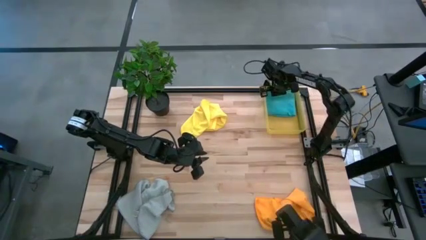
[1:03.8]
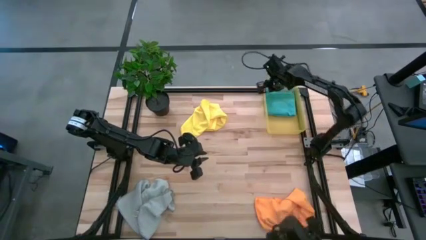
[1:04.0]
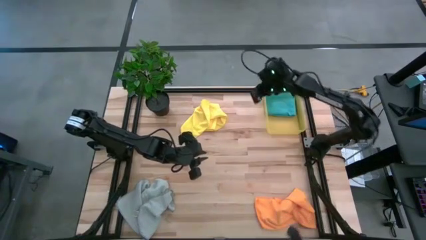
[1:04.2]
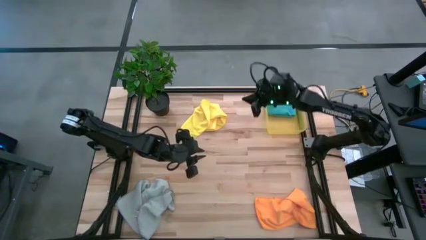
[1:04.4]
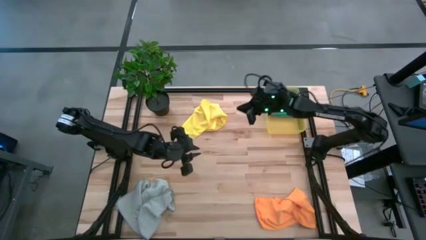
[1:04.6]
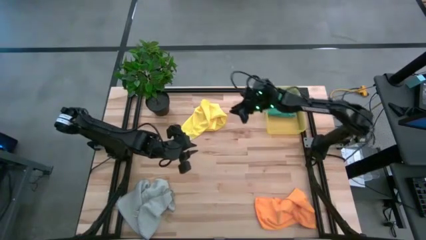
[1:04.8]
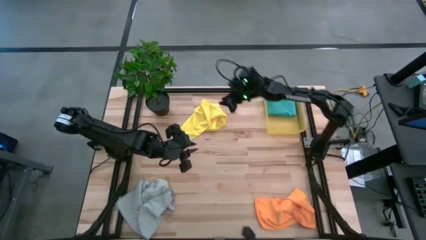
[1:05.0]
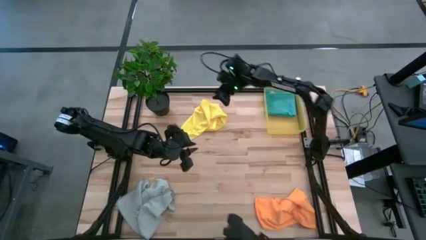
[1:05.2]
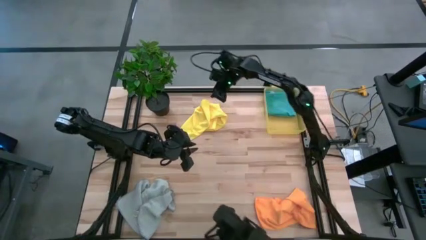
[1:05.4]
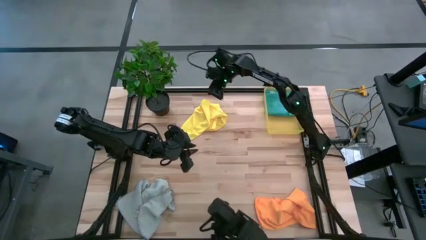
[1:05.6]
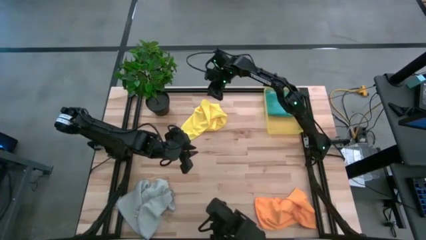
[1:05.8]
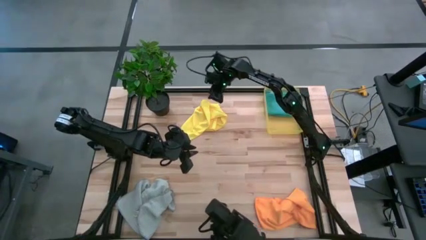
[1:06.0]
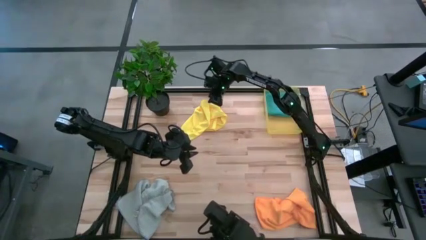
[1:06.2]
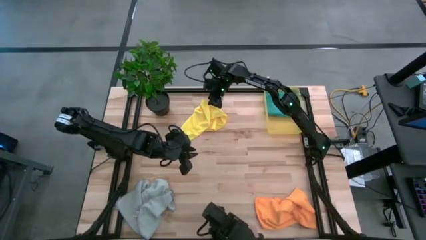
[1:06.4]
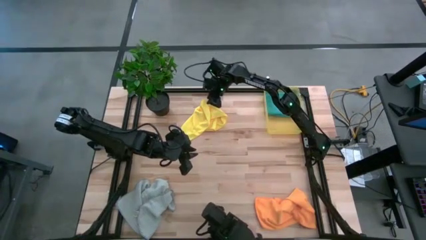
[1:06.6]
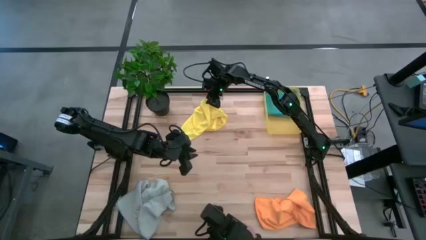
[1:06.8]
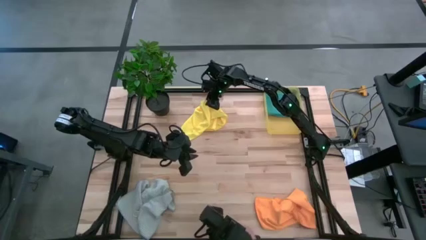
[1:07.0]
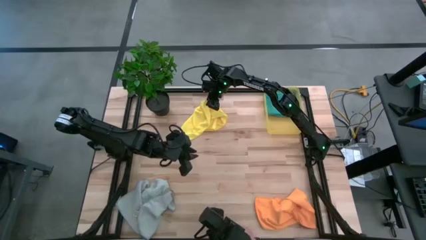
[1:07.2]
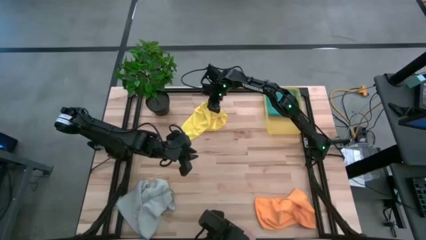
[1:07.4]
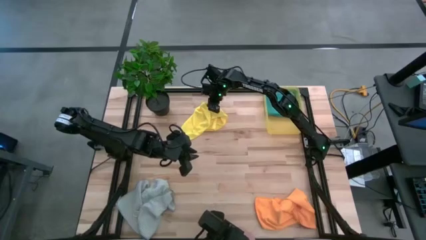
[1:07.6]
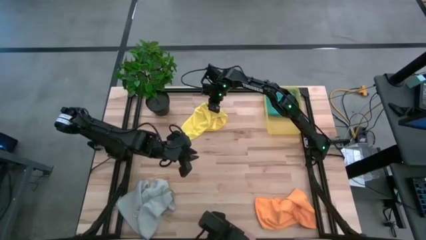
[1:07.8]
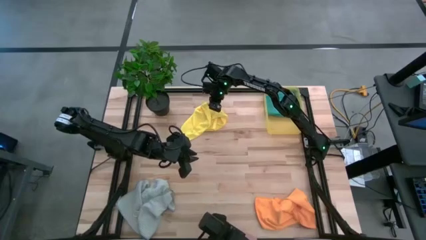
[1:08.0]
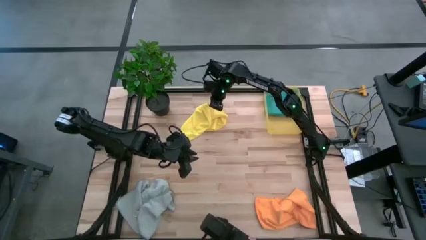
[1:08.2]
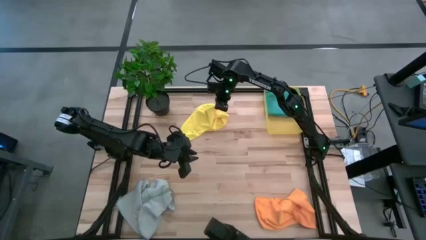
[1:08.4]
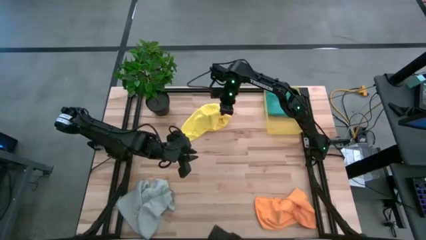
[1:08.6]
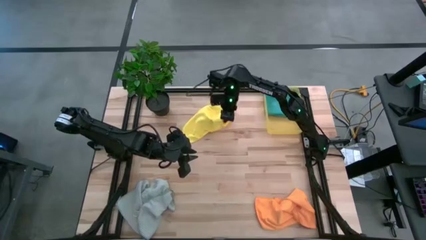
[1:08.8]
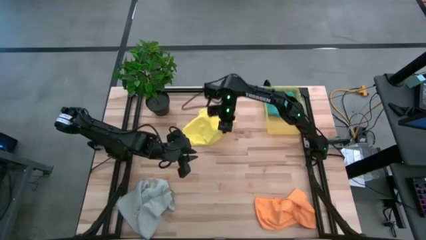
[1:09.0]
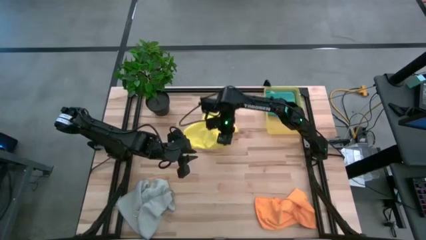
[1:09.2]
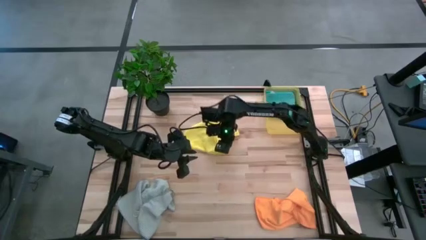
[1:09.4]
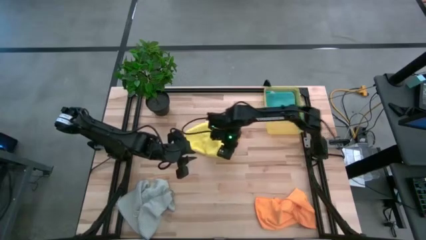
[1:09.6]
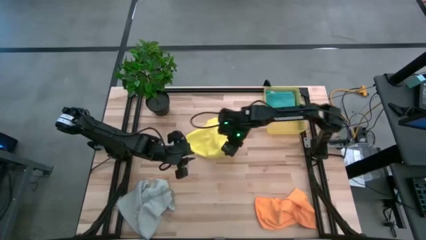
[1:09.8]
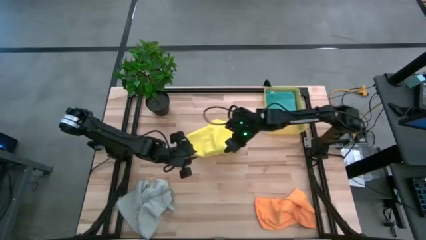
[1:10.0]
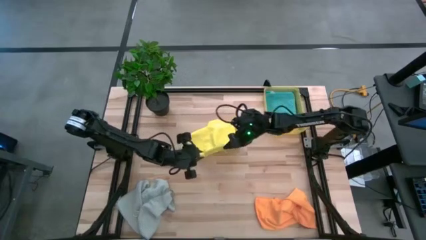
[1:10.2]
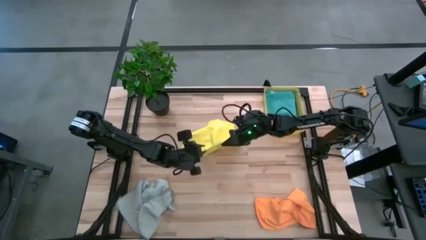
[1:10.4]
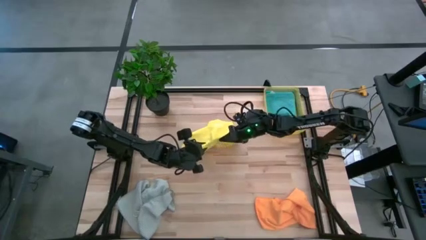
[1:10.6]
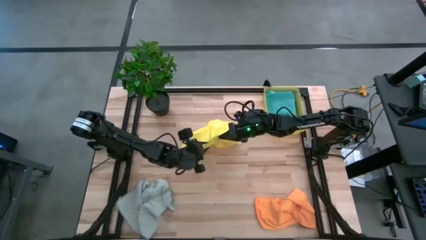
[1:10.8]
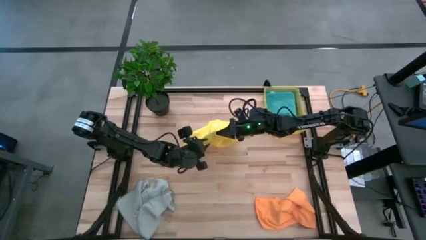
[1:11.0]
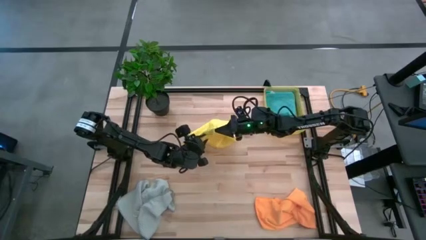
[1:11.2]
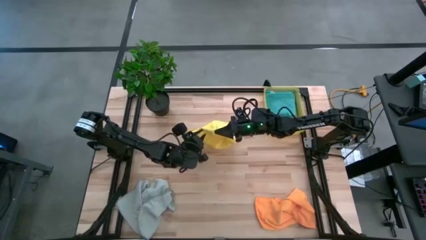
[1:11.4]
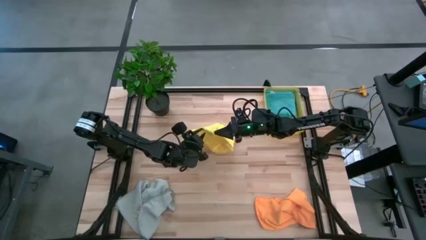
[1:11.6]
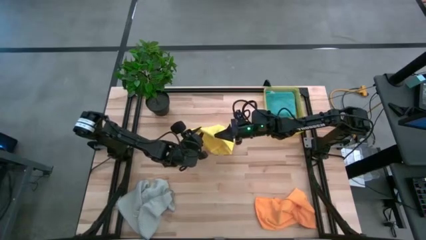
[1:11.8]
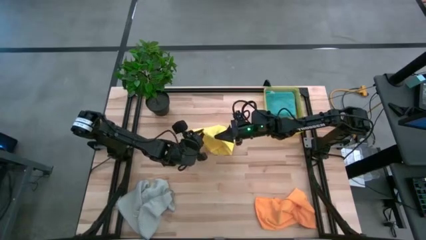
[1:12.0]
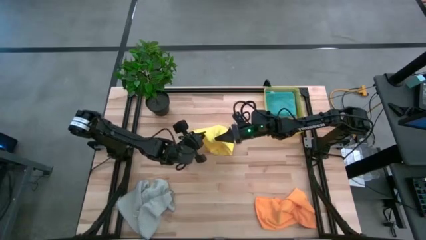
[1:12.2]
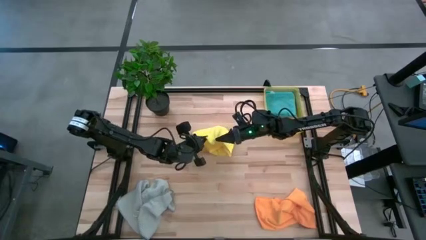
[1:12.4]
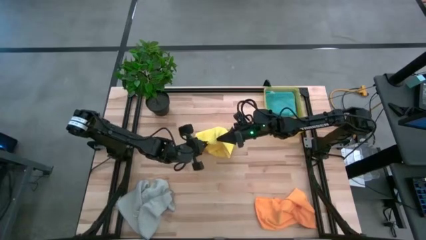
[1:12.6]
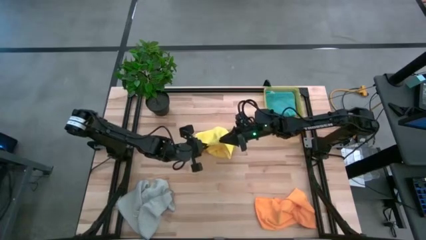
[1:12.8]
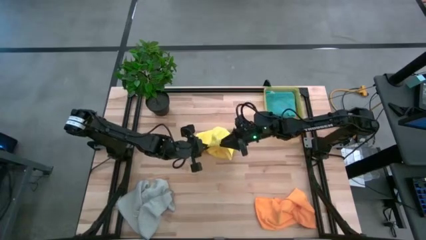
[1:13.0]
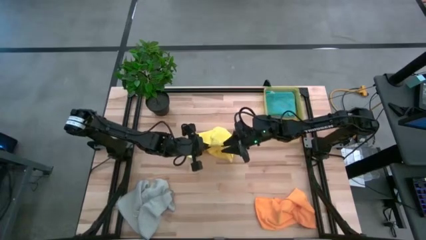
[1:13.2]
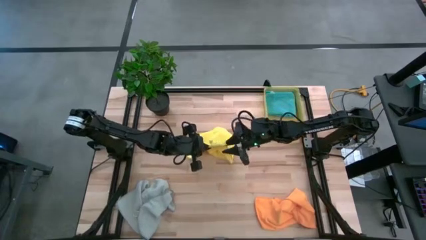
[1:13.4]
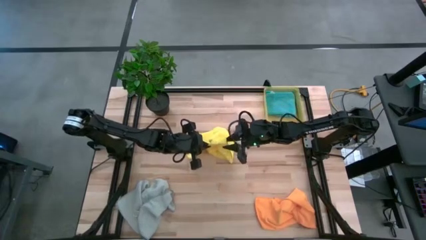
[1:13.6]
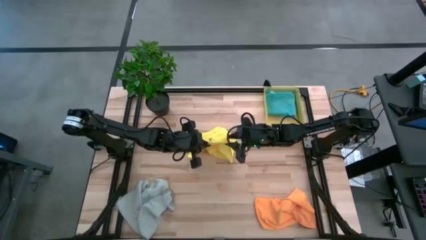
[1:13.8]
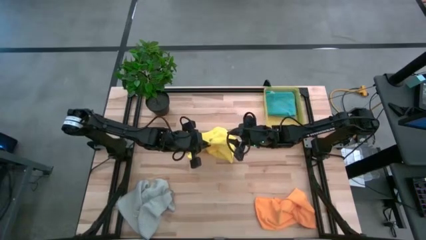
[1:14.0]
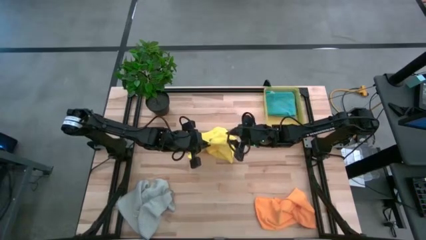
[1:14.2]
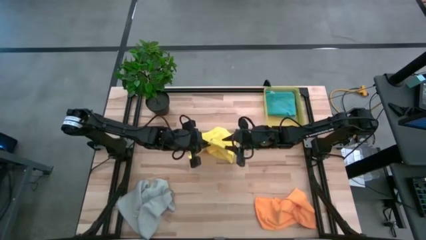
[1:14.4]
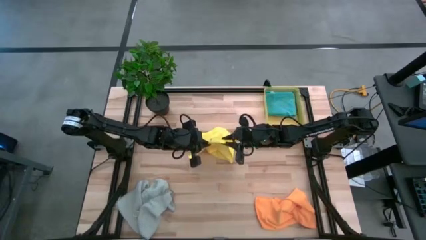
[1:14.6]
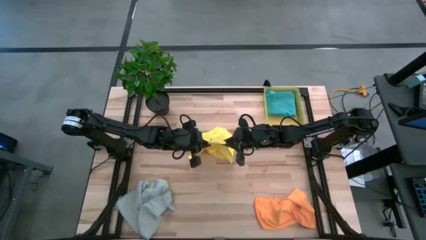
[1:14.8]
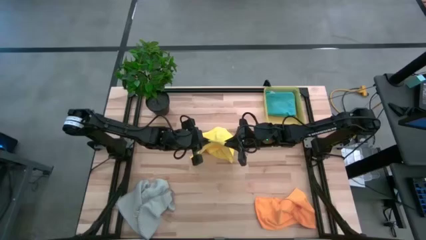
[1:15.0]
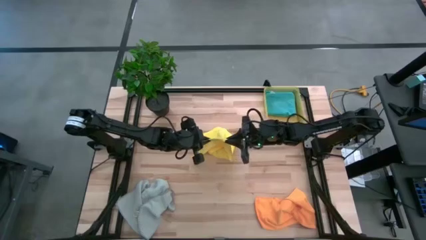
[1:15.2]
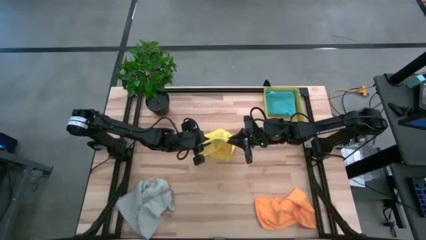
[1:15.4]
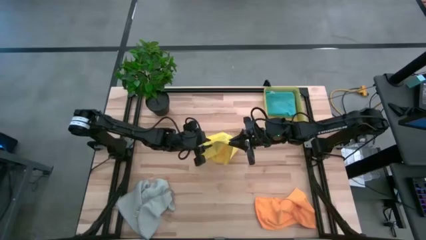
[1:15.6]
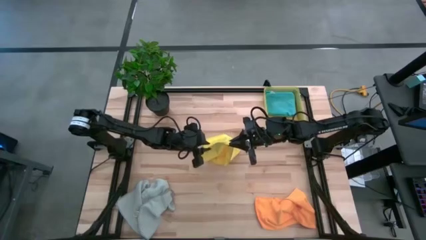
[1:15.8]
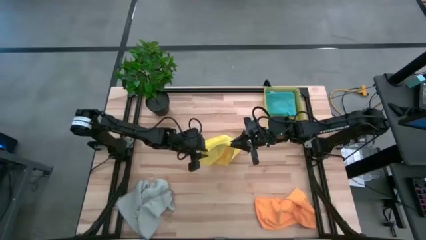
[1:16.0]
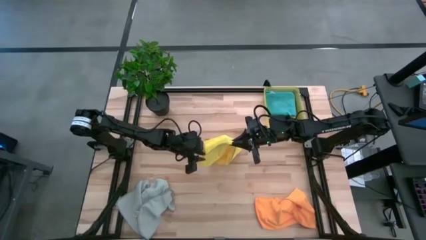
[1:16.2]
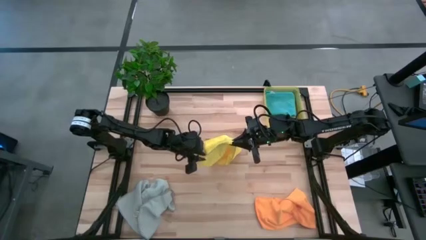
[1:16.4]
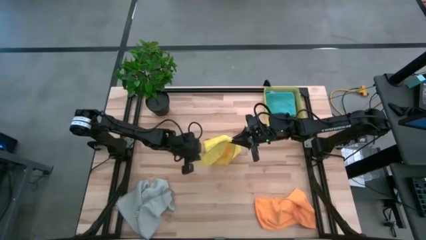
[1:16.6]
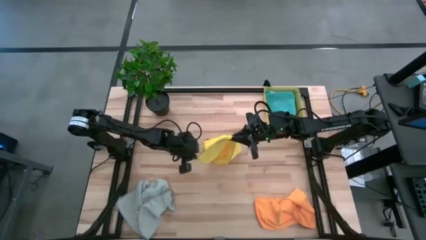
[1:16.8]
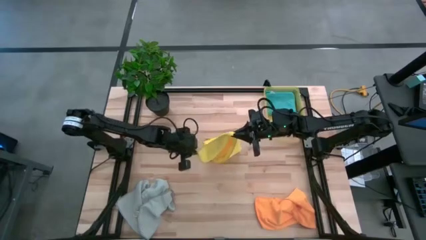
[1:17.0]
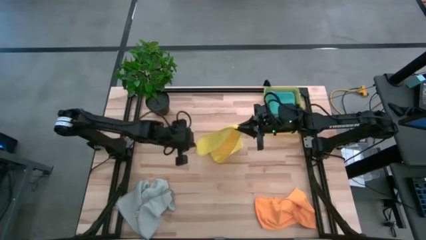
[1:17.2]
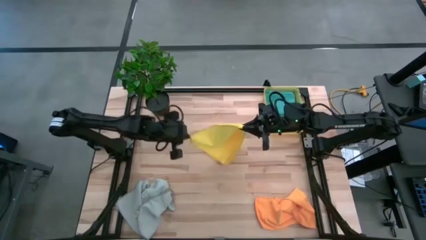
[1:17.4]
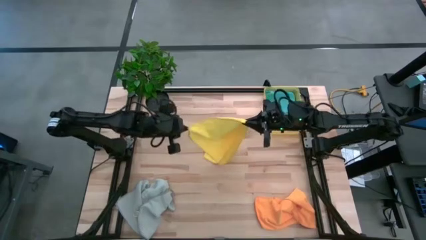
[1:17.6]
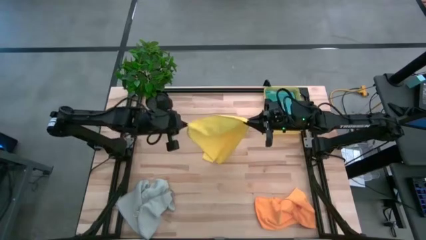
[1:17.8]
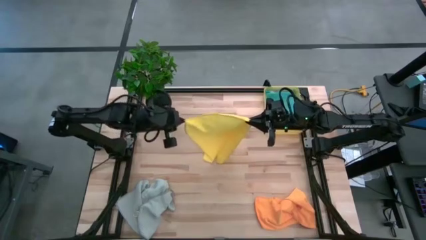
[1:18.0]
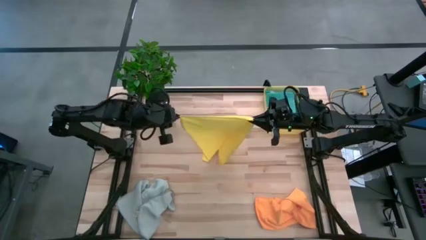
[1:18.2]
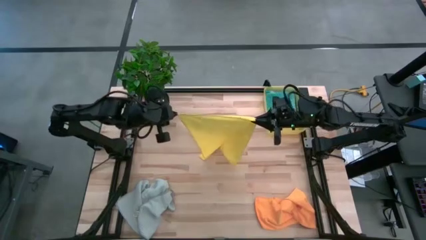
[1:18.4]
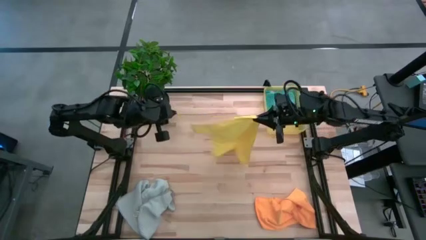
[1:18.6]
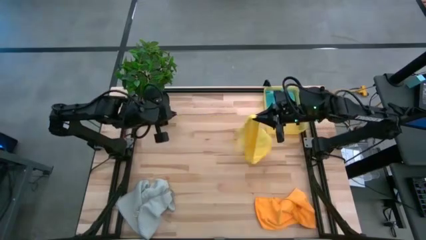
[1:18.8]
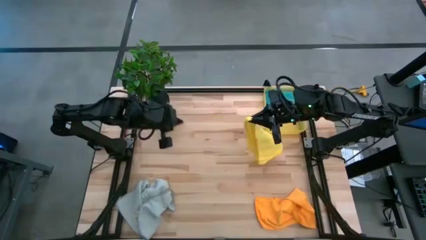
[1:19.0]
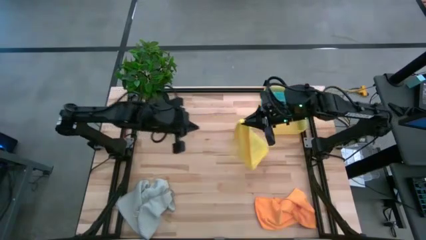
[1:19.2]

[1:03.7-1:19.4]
Task: Fold microfiber towels
Fold the yellow microfiber towel
